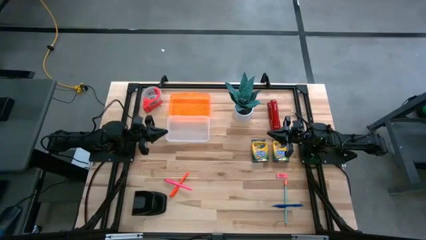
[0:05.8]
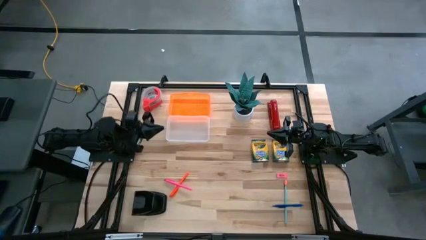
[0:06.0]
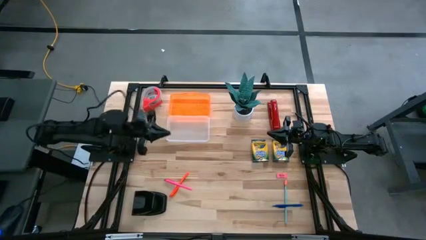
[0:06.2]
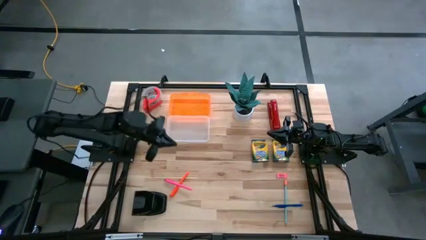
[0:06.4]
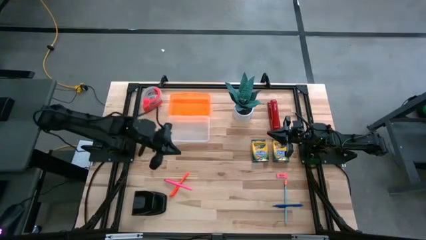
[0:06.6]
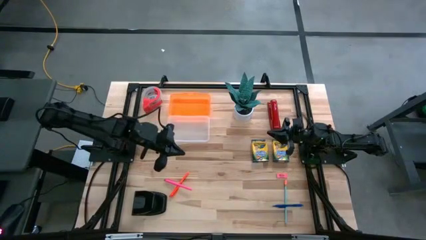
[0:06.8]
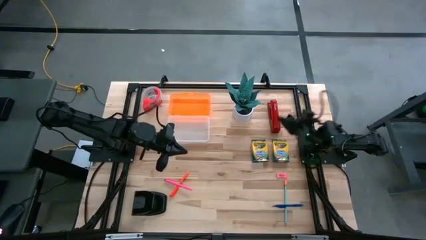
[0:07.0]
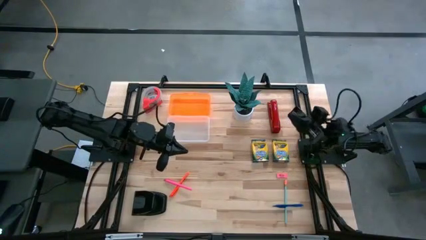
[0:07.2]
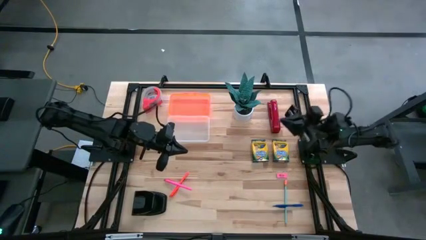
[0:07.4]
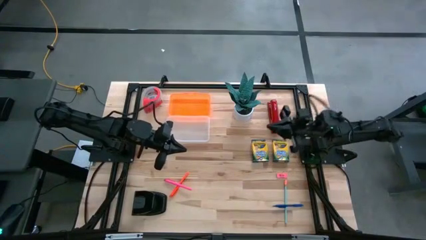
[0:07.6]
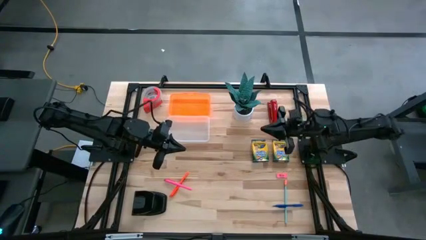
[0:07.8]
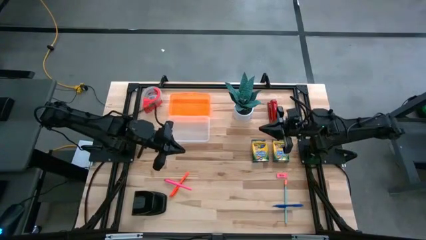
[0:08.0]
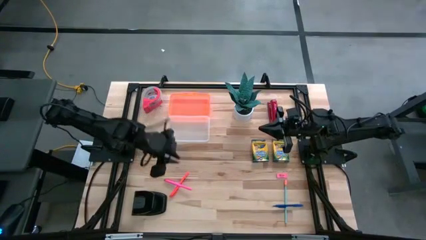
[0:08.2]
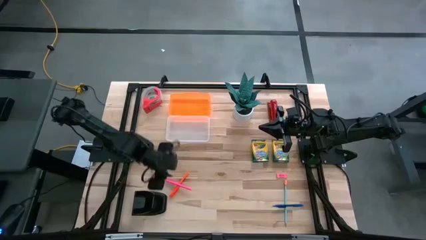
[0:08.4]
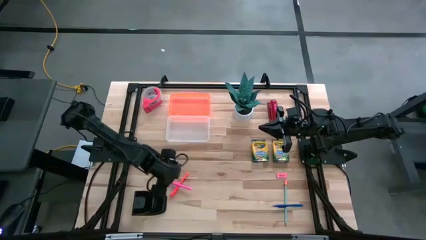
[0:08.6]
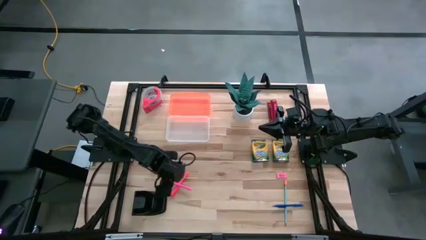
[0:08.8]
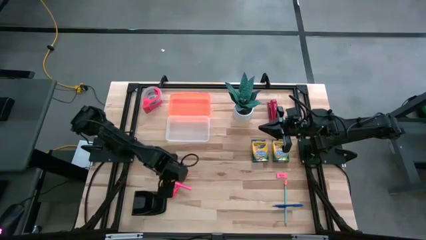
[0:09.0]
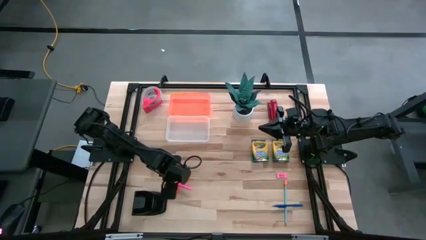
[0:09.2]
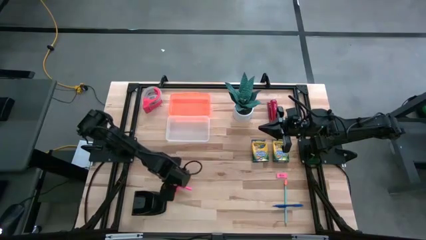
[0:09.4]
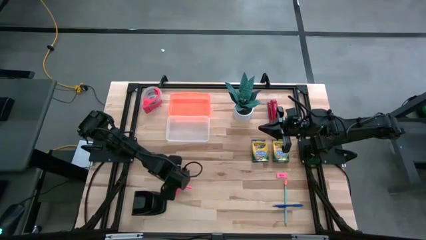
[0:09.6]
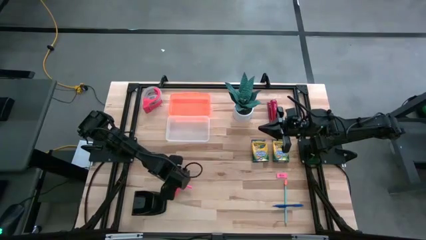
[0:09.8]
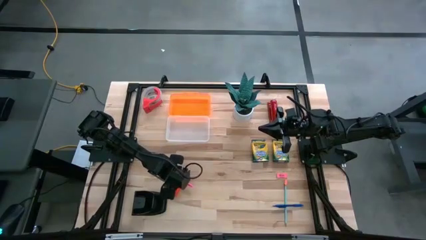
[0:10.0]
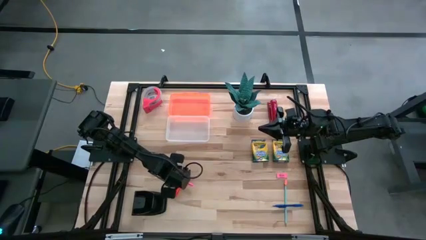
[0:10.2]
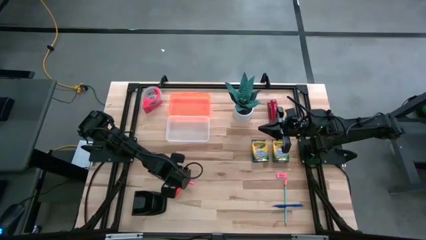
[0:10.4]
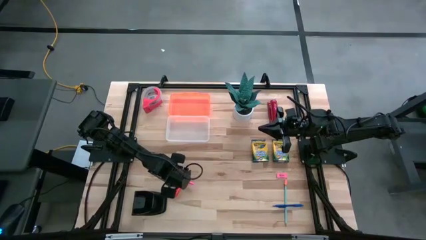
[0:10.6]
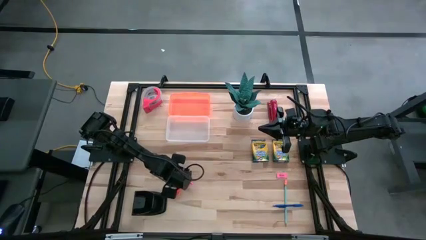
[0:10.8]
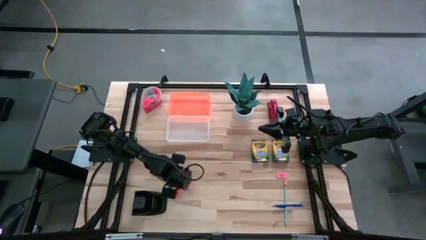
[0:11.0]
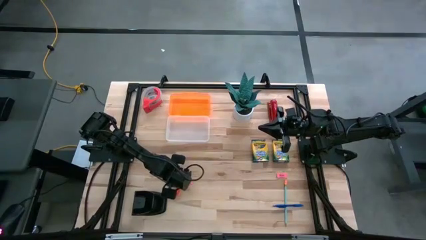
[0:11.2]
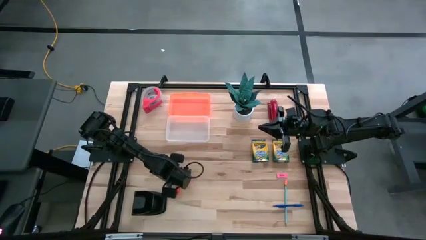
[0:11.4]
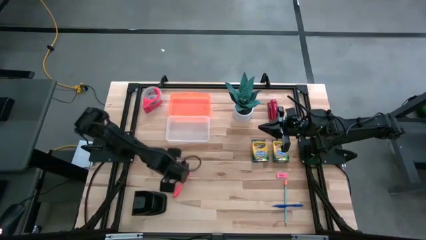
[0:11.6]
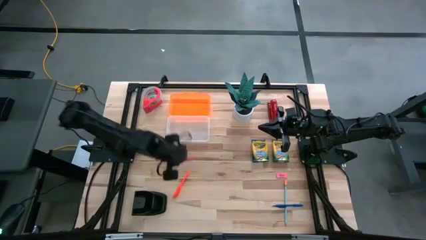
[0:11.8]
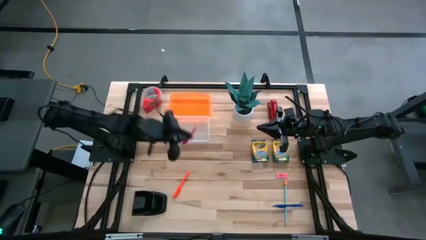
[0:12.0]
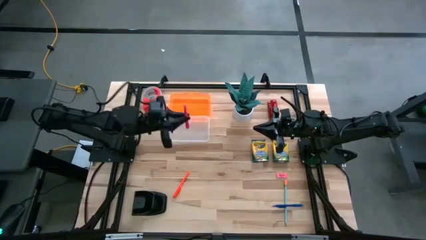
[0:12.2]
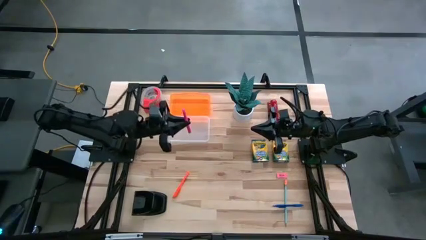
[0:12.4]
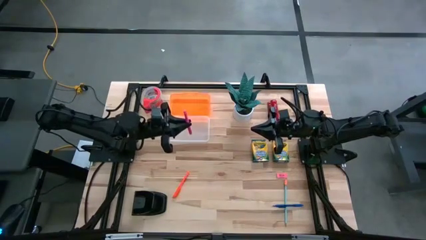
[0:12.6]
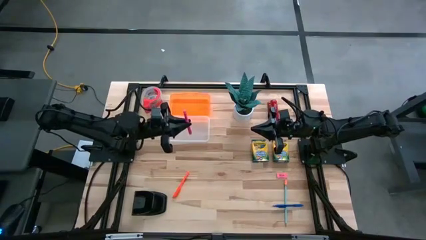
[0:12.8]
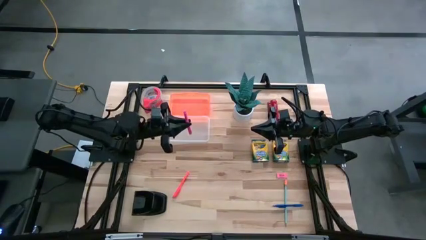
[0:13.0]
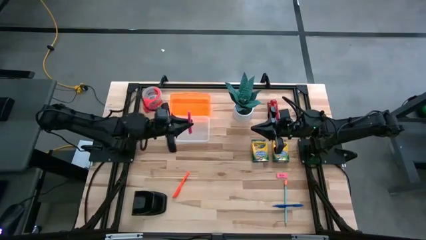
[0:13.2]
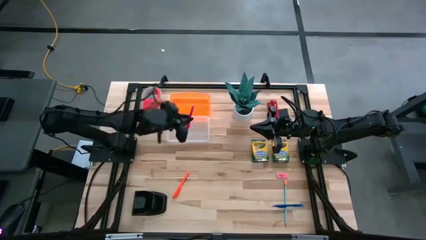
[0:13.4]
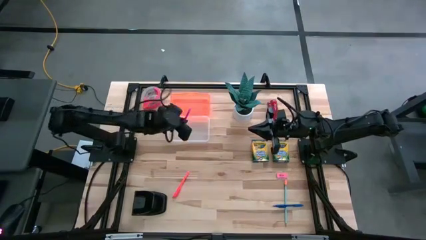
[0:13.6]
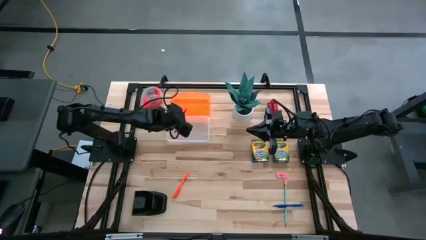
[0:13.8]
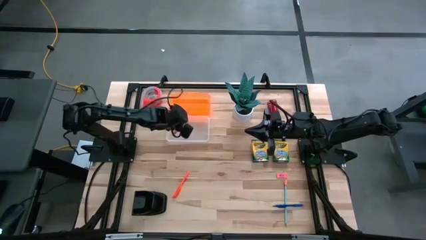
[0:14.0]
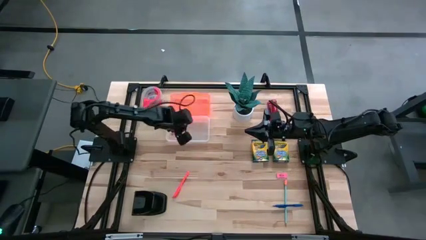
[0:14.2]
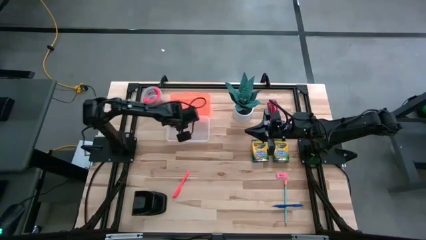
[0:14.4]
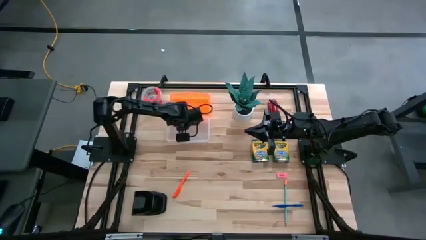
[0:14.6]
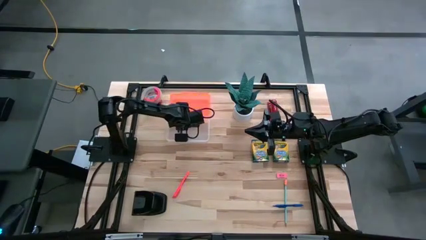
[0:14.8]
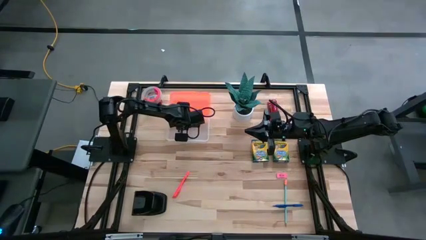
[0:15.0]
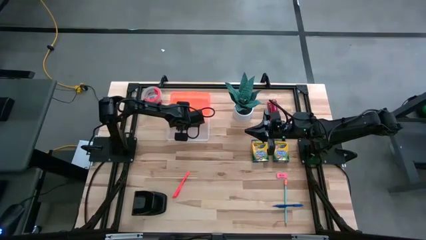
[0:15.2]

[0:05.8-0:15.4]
Task: Pack school essentials
Put the pink pen into the orange supply box

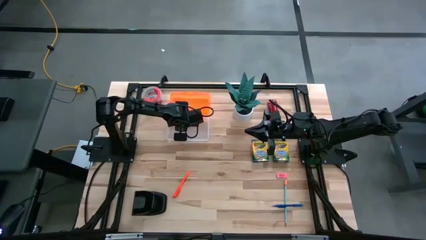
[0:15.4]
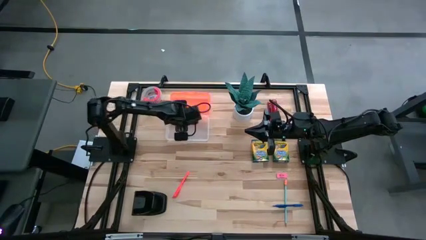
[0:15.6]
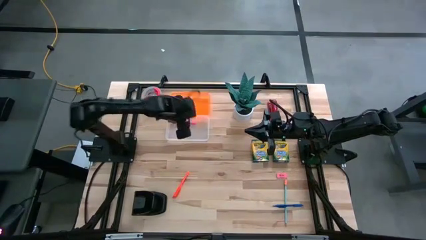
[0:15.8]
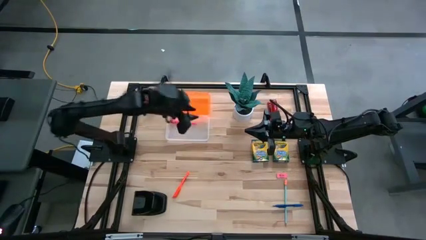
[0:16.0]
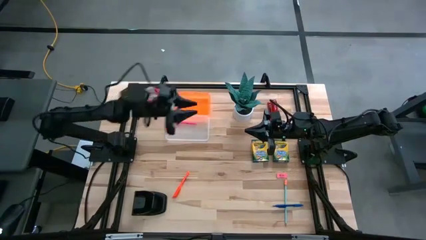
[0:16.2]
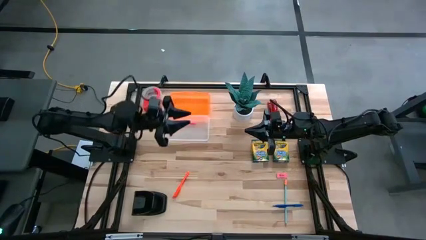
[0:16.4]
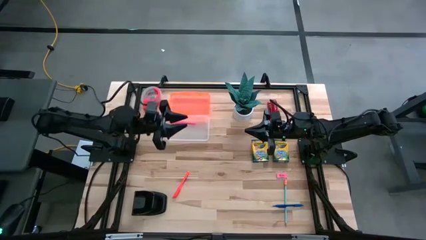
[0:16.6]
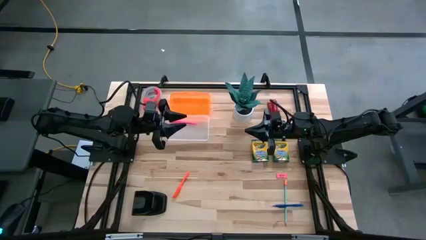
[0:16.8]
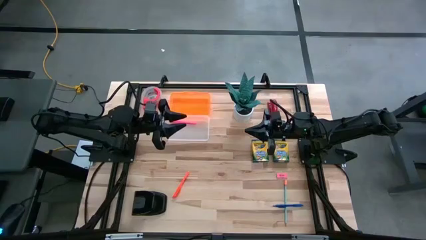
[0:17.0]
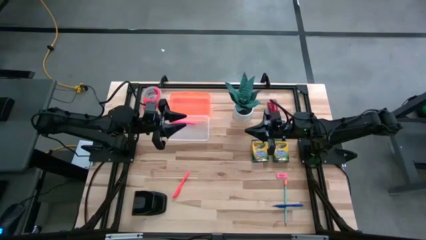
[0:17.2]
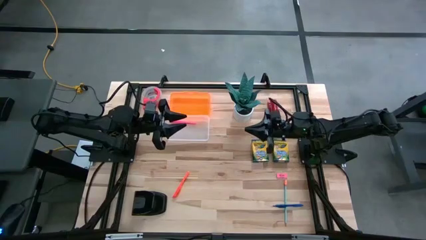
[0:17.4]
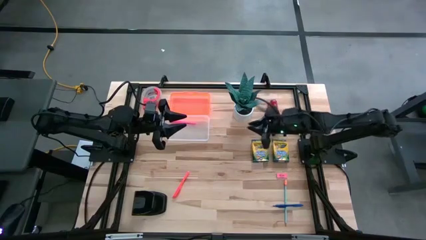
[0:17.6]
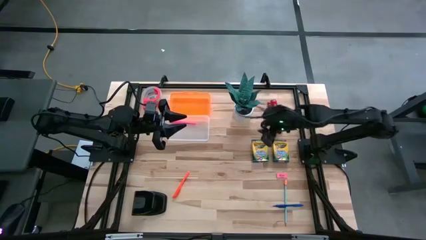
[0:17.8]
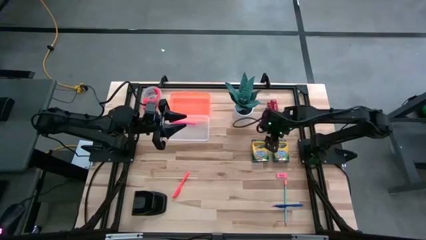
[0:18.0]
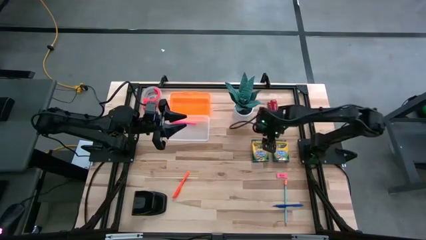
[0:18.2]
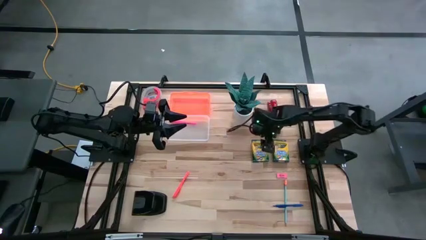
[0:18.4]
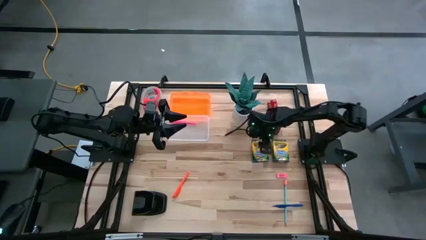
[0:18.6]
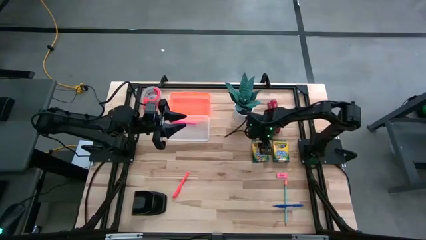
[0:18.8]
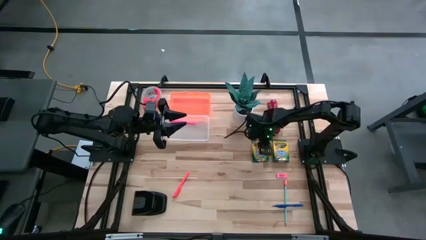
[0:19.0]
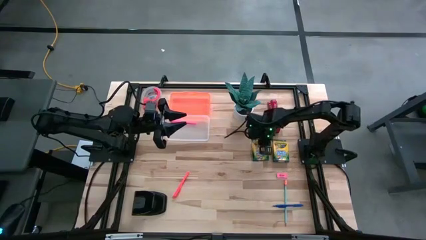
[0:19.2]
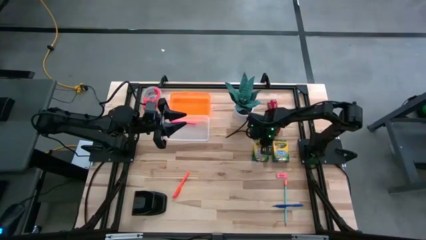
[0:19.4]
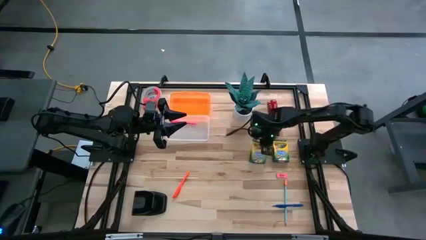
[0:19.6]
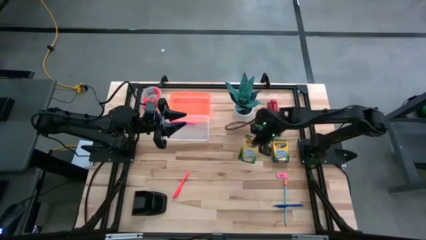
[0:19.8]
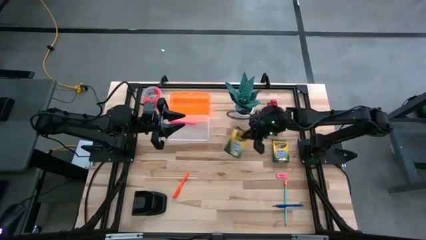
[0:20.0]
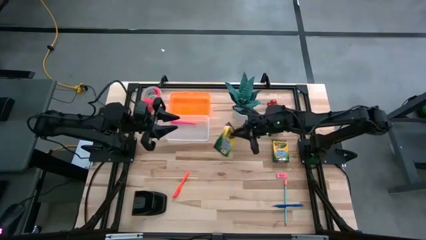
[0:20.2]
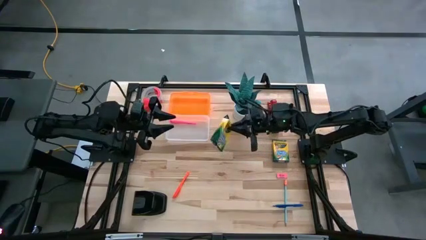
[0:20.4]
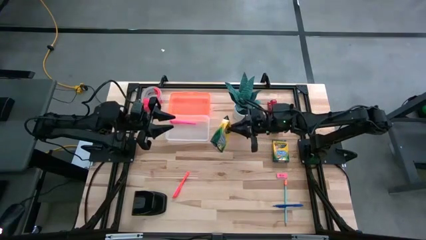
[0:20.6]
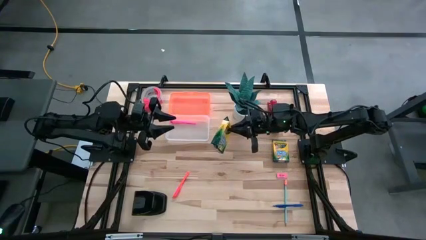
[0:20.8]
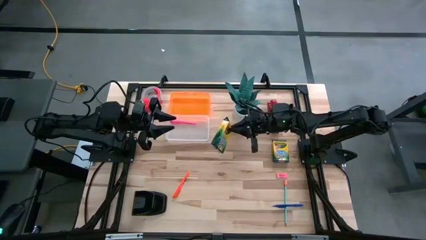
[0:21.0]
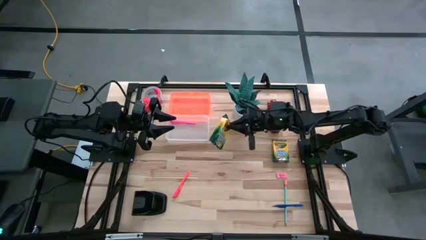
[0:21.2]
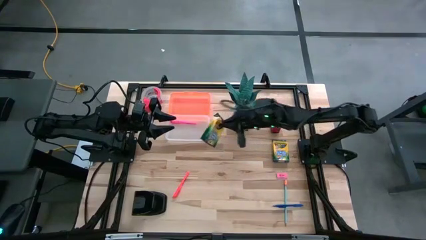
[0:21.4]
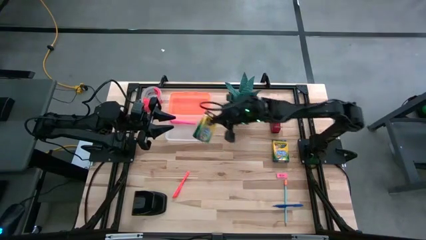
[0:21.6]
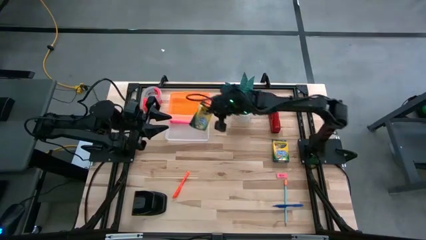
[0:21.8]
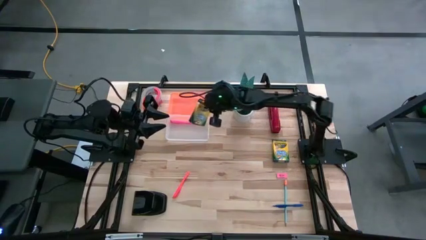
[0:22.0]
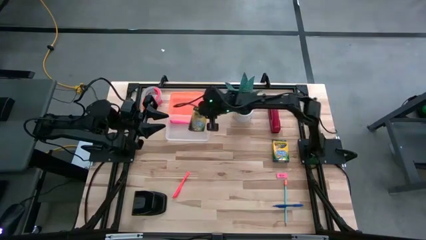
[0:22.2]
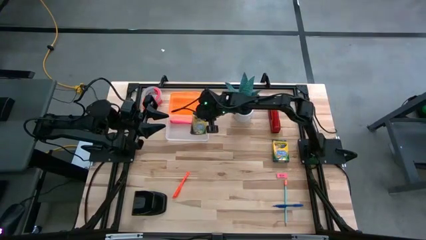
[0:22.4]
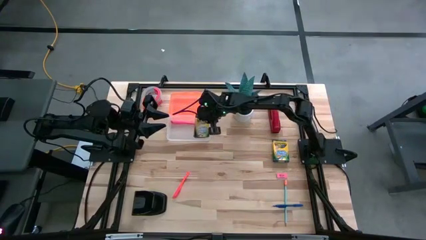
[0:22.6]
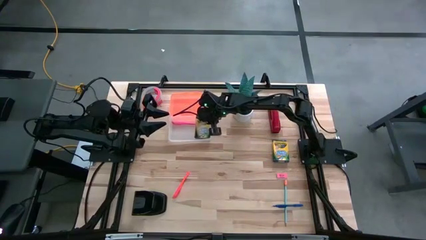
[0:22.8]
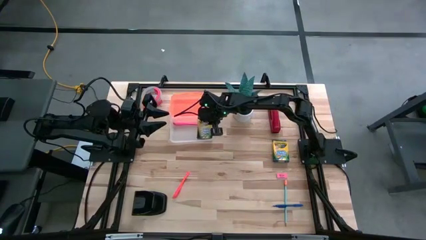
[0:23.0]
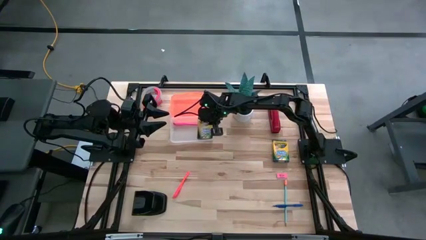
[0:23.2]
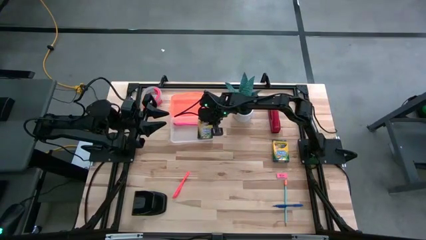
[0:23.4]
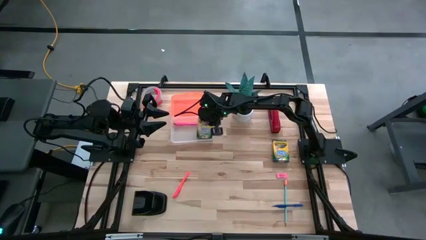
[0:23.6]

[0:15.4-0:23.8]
Put the left yellow crayon box into the orange supply box
